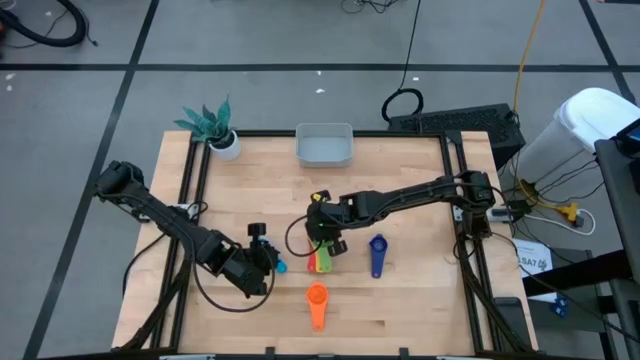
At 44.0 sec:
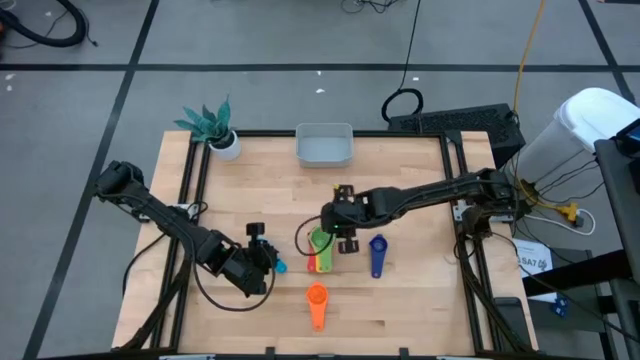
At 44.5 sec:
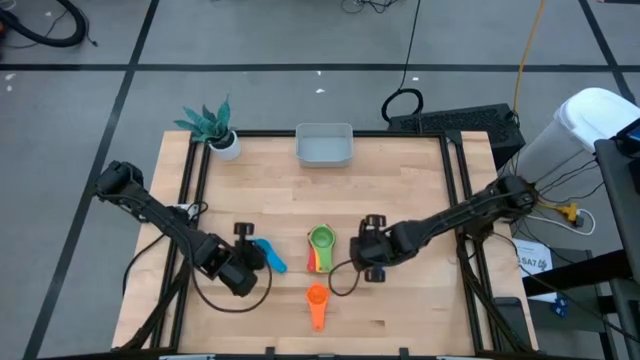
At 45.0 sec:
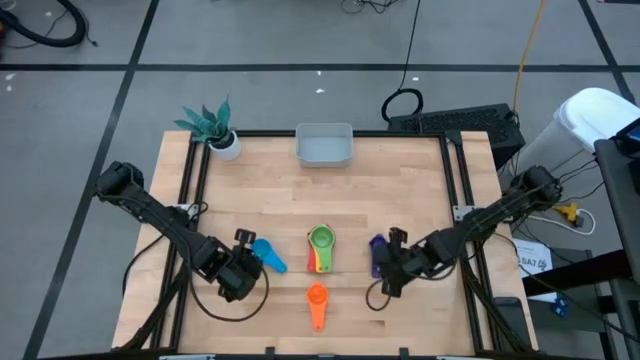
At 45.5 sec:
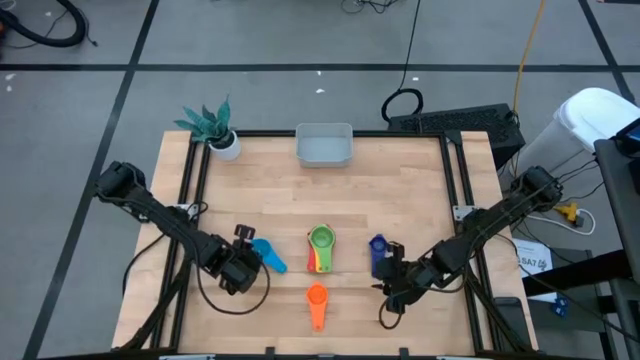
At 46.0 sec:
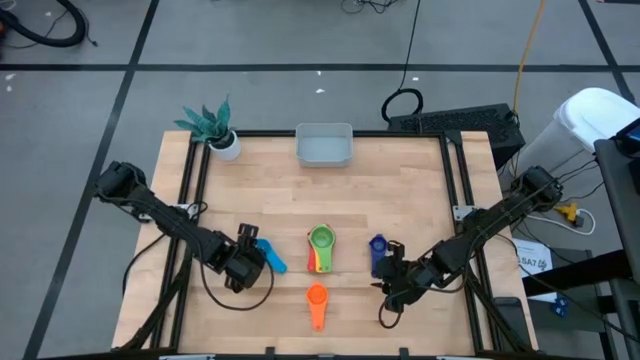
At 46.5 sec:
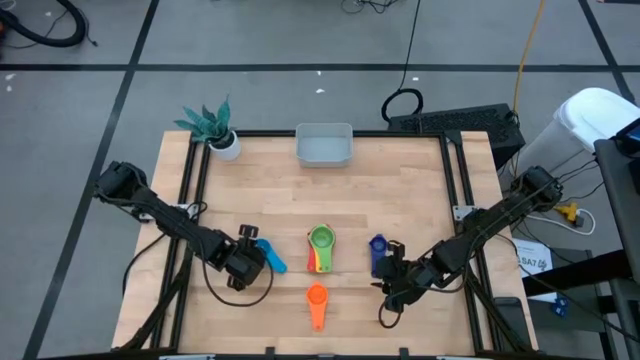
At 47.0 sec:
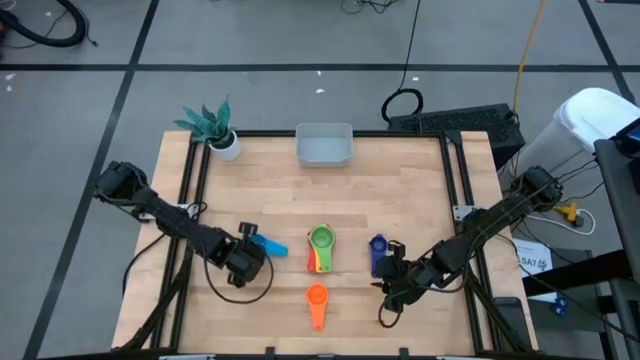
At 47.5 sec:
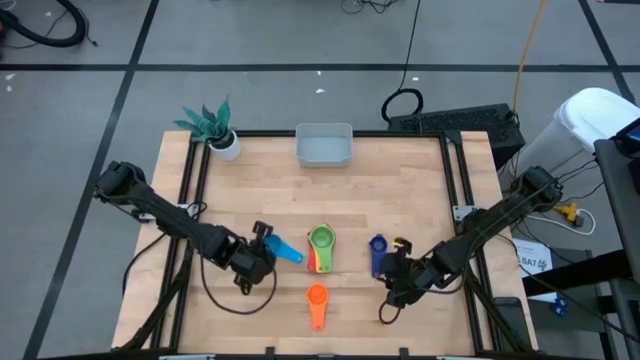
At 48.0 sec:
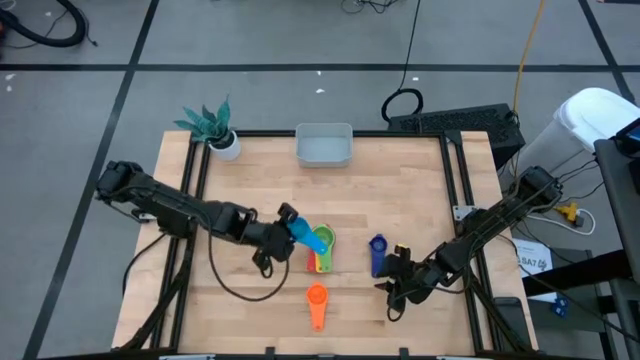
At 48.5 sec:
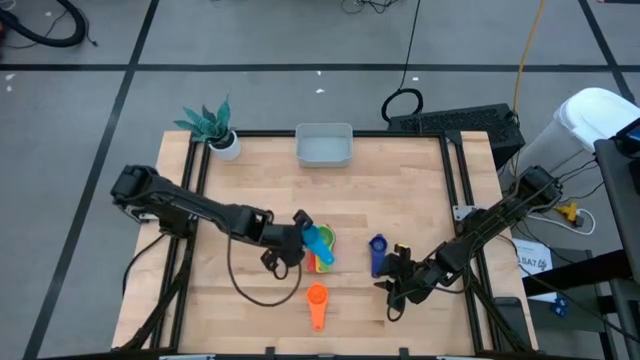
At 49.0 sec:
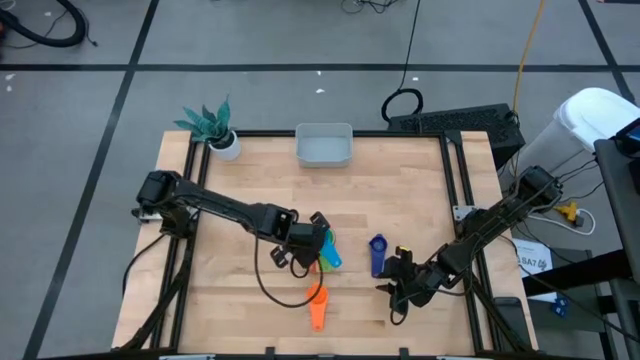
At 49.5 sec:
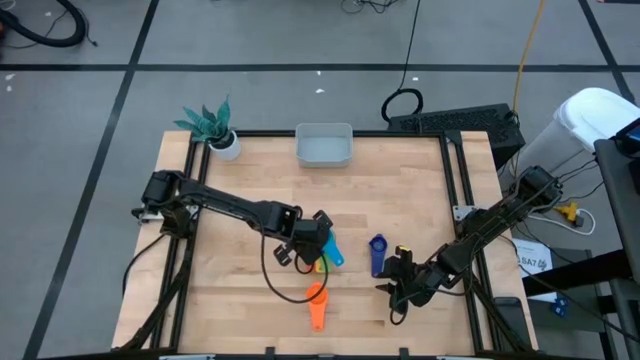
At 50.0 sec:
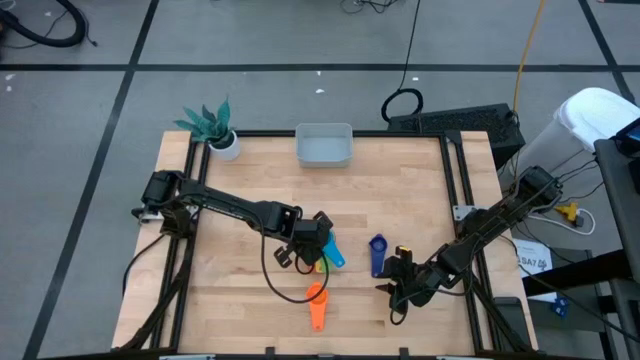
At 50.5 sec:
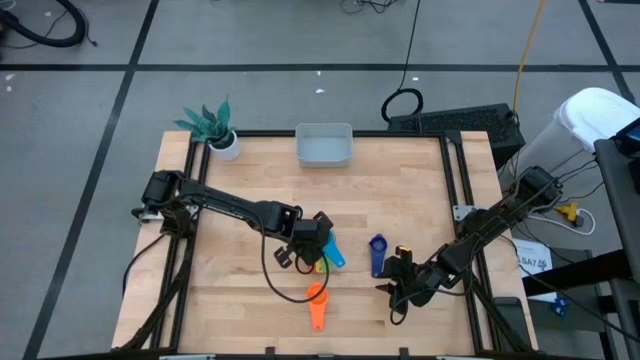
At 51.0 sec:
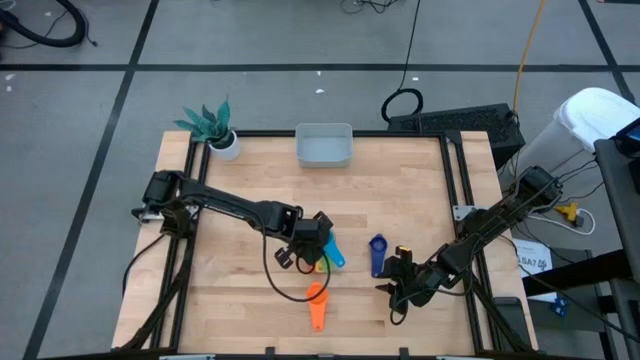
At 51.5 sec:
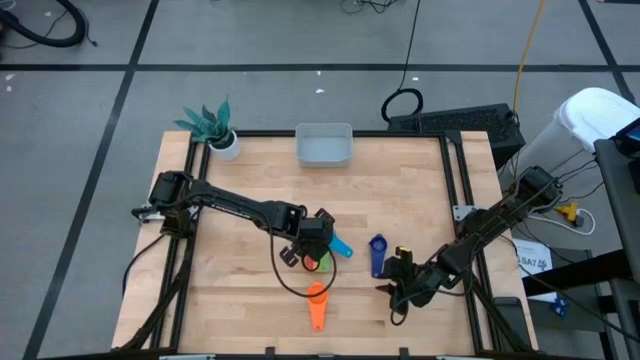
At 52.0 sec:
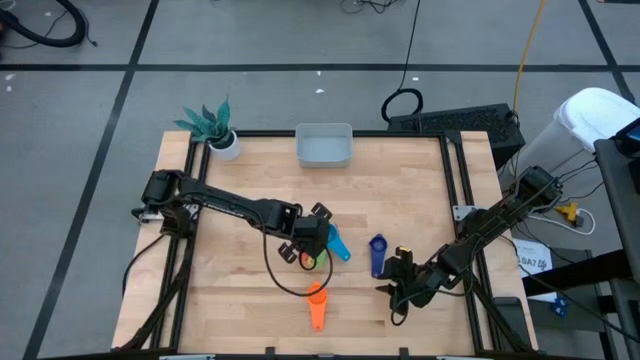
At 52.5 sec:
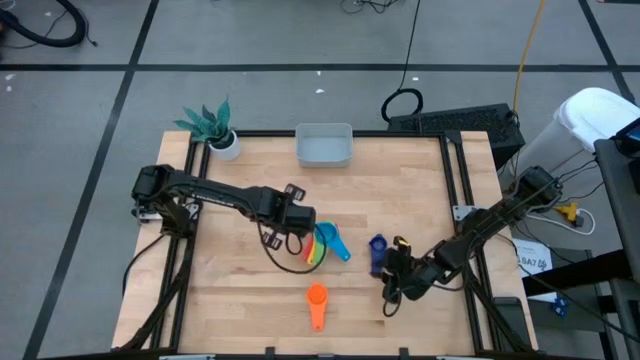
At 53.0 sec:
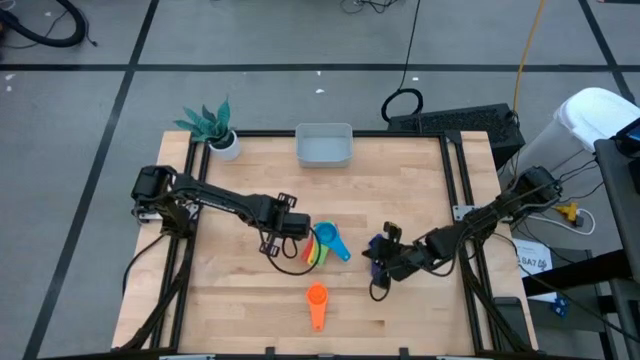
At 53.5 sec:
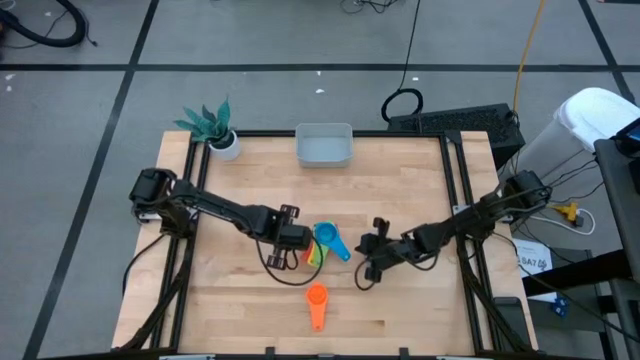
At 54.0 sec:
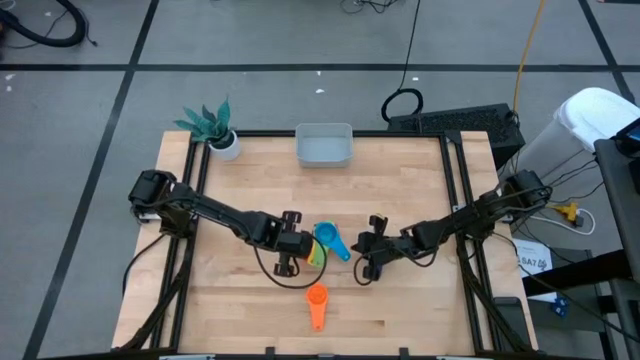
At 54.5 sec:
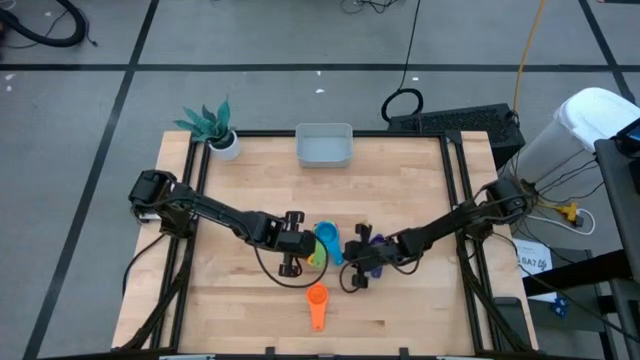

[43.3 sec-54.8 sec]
Task: Nest measuring cups in basket
Stack the light blue measuring cup on top of the green measuring cup

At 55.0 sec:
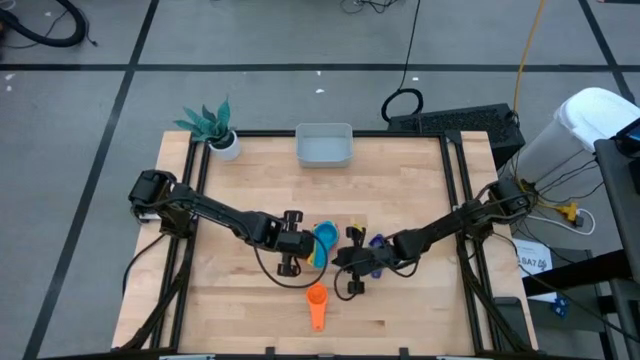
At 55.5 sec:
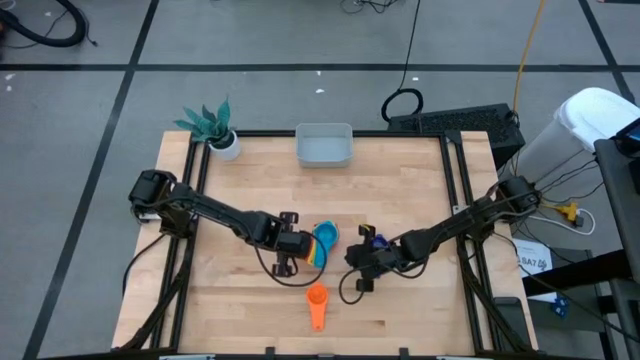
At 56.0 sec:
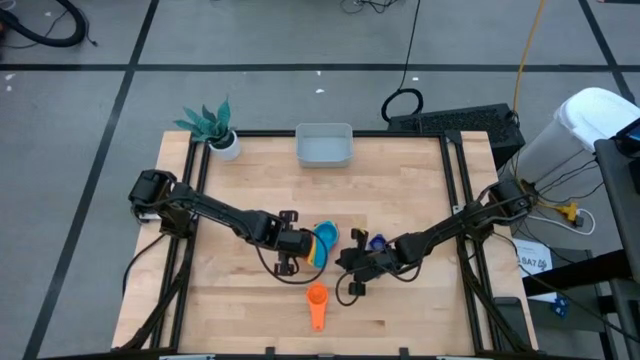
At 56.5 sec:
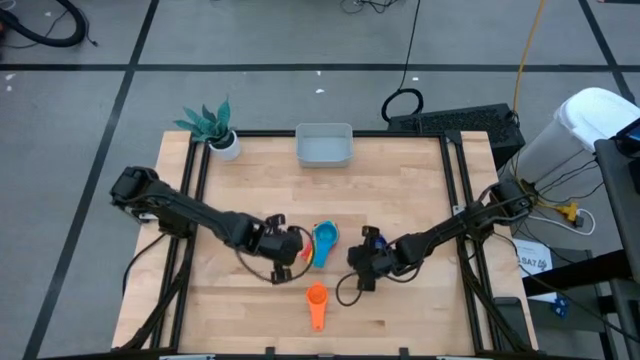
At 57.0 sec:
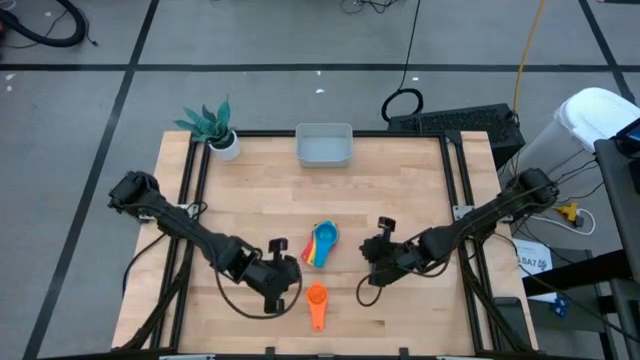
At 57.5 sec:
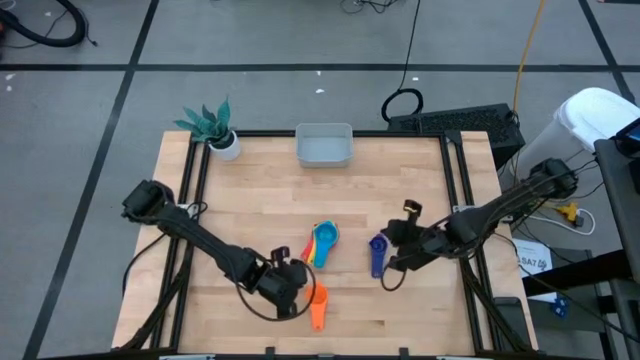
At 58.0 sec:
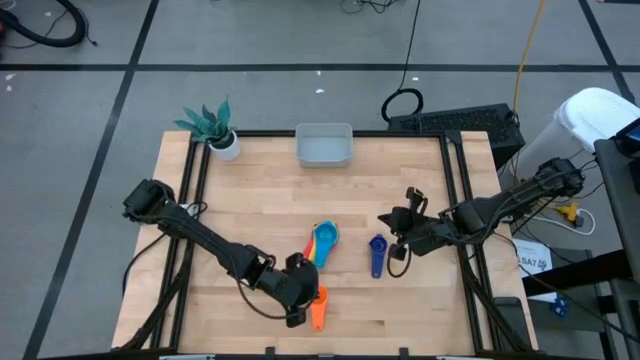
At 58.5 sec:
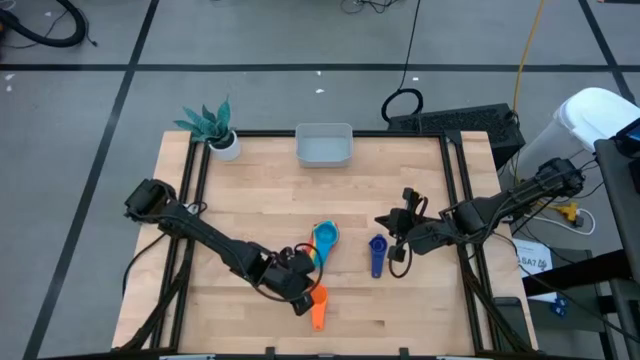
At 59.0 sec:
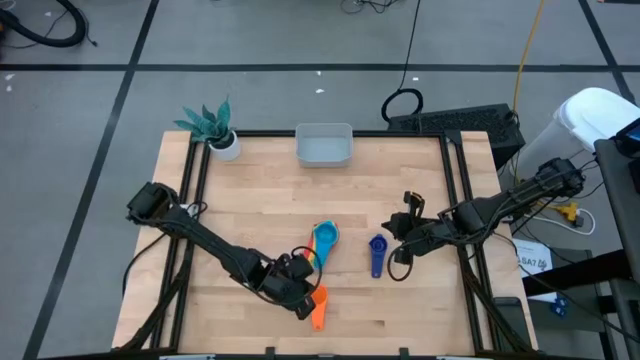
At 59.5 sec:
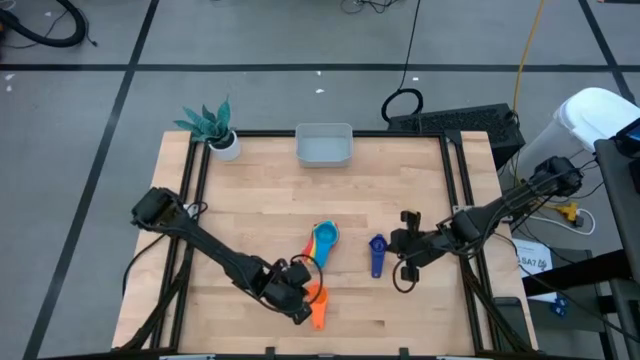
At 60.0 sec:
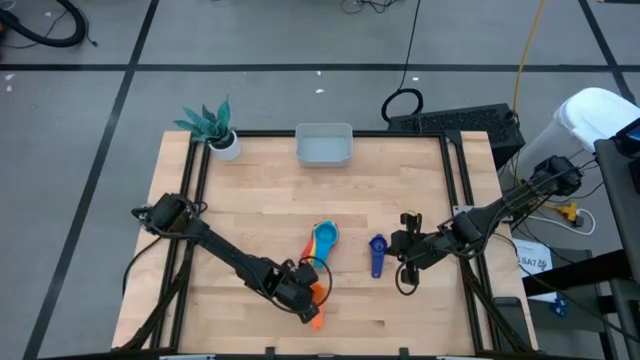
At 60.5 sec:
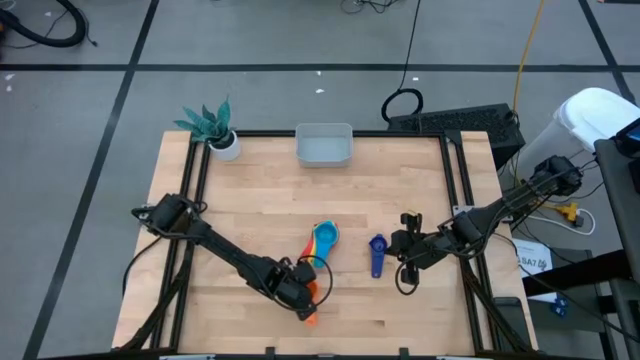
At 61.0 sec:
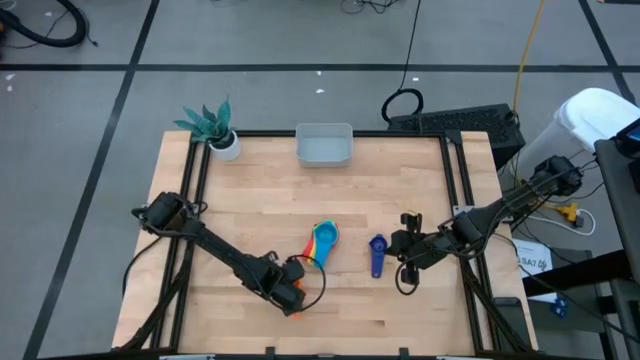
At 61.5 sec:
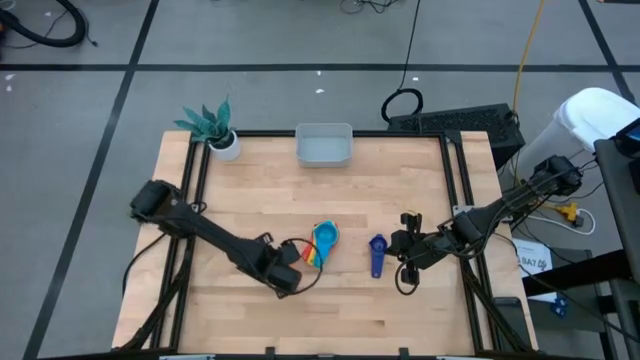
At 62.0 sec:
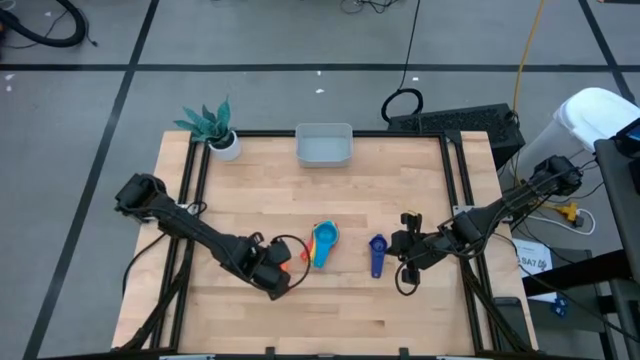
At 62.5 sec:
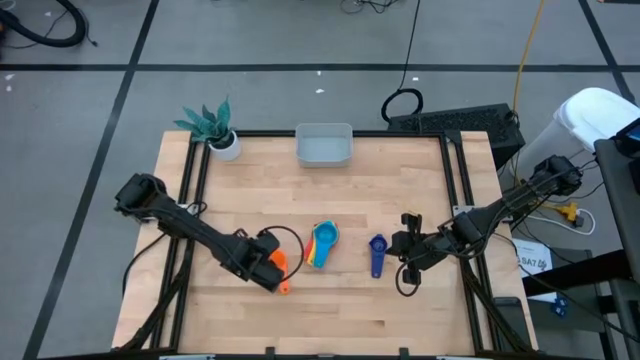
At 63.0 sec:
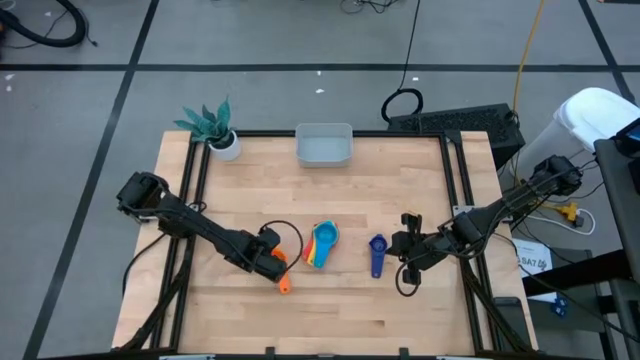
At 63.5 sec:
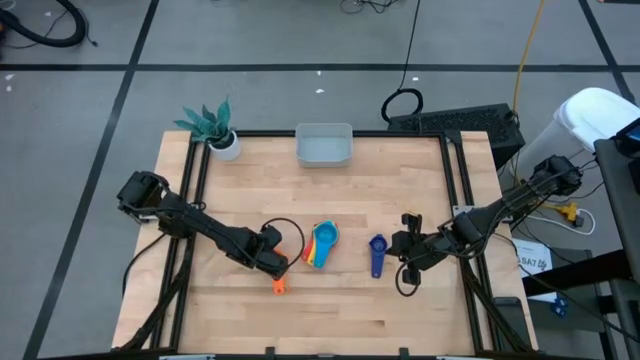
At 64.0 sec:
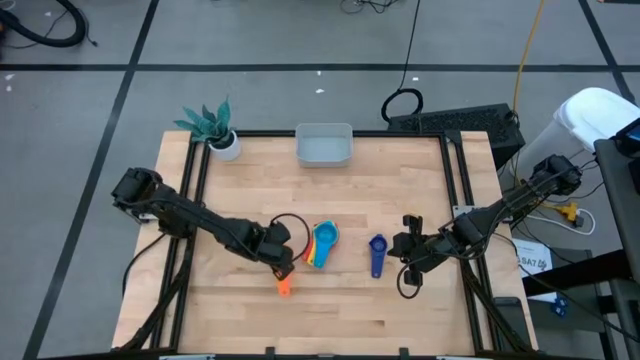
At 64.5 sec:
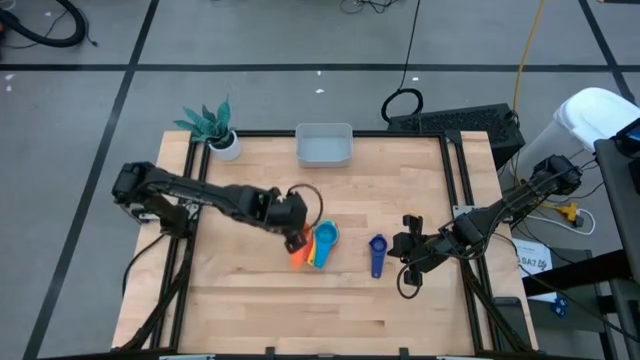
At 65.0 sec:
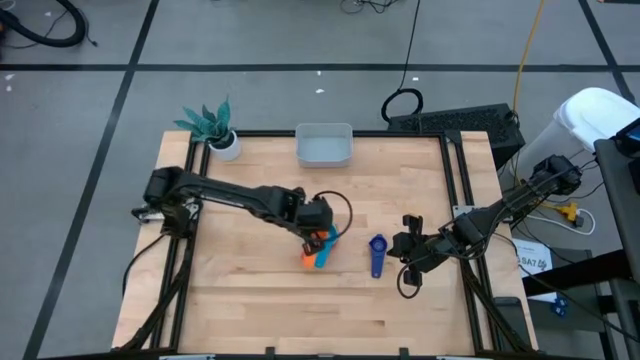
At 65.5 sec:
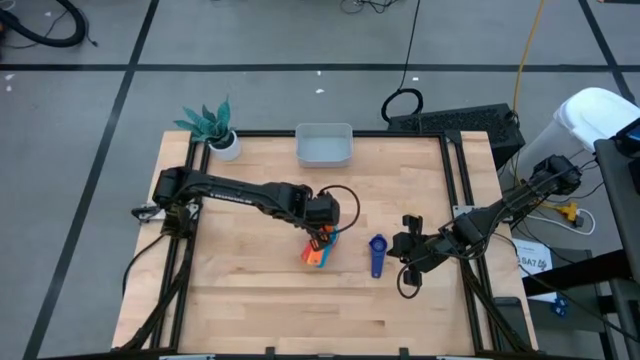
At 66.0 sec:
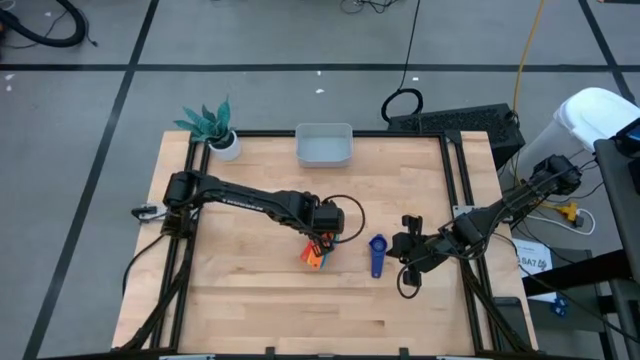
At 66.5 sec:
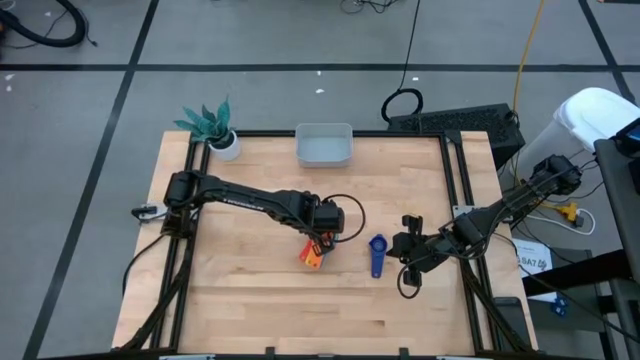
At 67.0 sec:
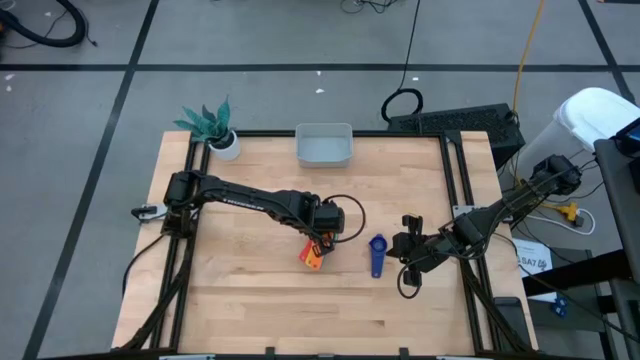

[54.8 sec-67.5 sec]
Stack the orange measuring cup on top of the light blue measuring cup
